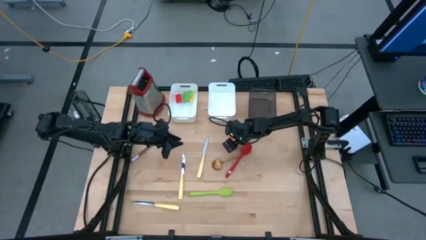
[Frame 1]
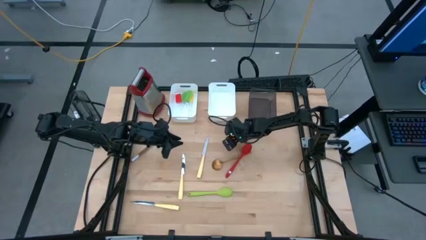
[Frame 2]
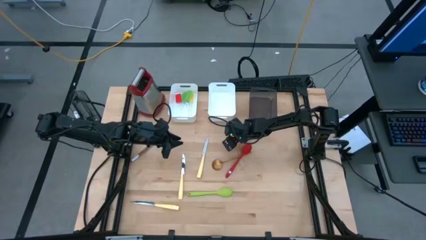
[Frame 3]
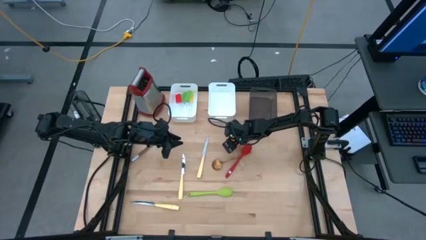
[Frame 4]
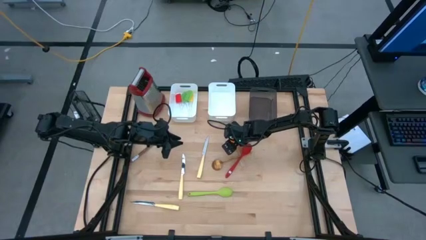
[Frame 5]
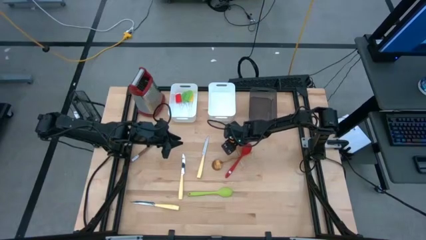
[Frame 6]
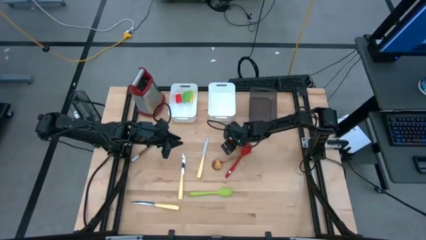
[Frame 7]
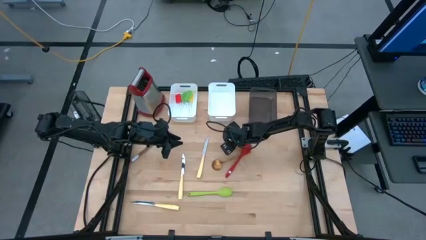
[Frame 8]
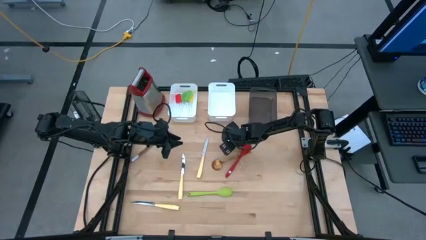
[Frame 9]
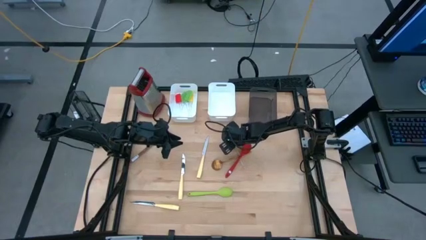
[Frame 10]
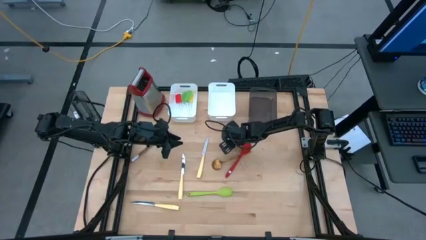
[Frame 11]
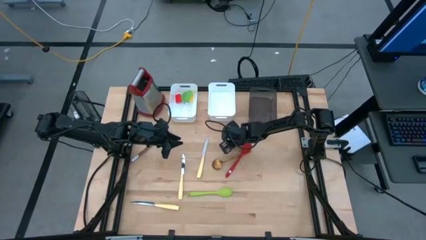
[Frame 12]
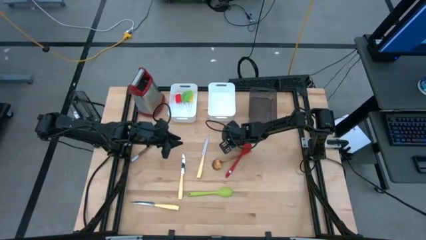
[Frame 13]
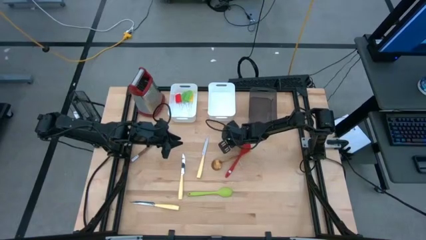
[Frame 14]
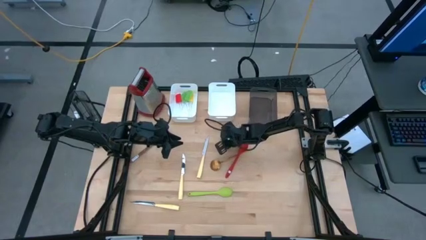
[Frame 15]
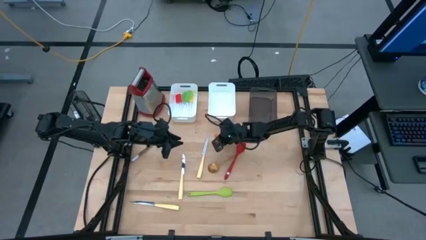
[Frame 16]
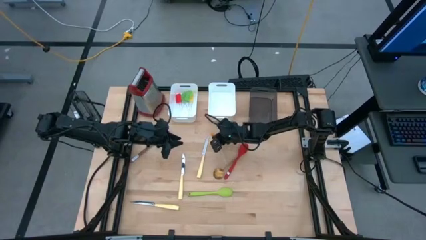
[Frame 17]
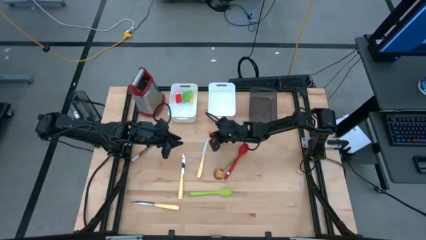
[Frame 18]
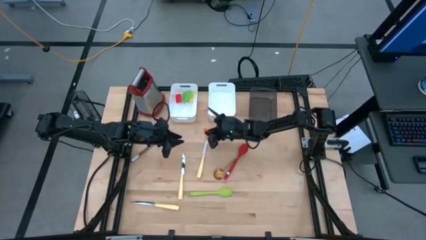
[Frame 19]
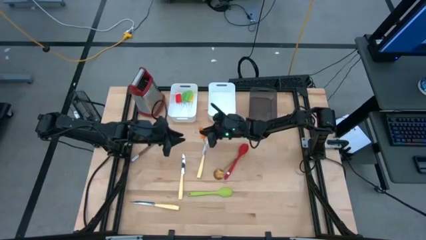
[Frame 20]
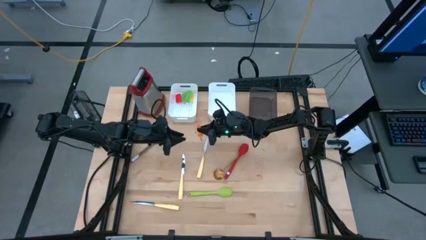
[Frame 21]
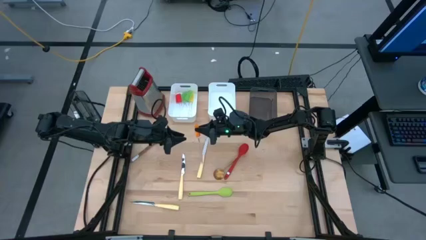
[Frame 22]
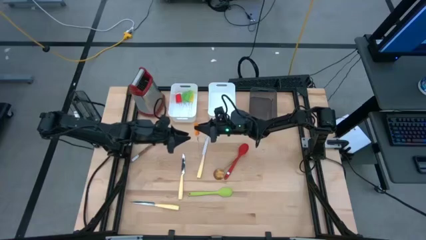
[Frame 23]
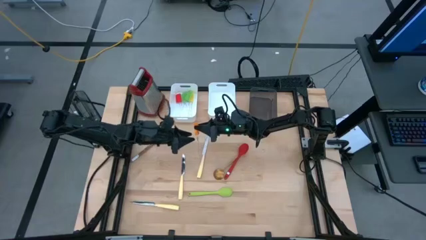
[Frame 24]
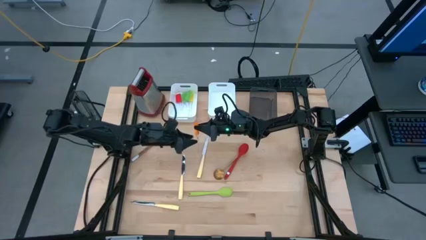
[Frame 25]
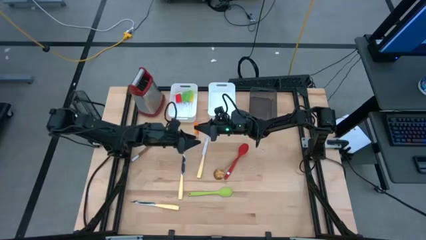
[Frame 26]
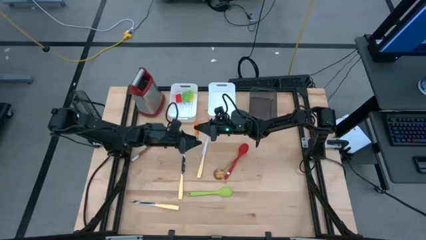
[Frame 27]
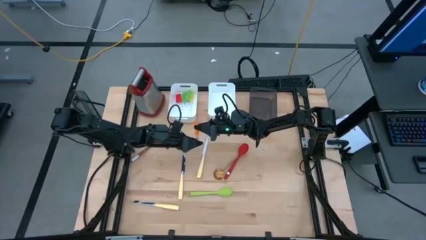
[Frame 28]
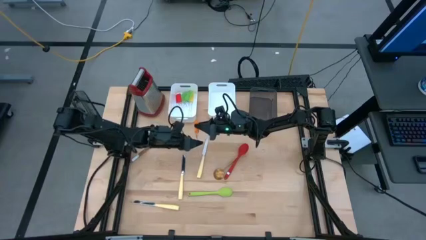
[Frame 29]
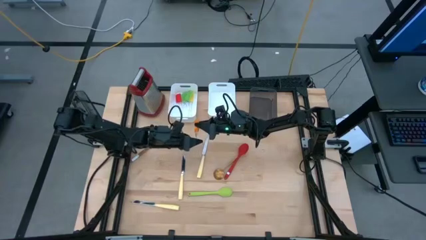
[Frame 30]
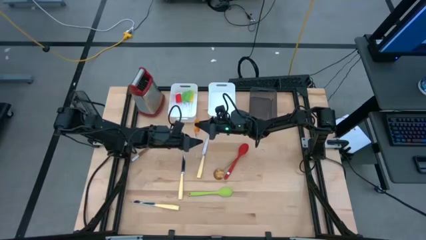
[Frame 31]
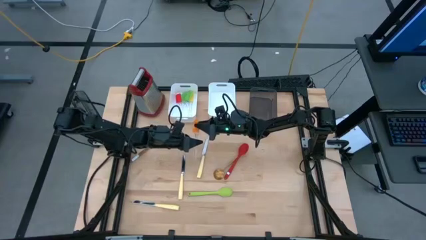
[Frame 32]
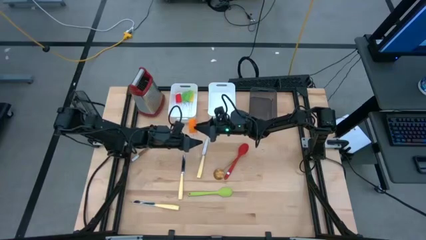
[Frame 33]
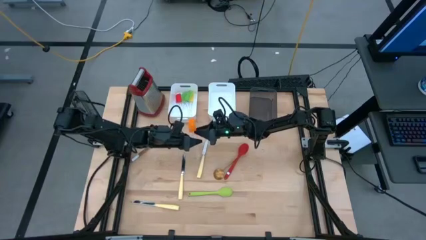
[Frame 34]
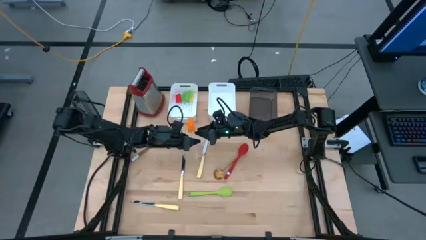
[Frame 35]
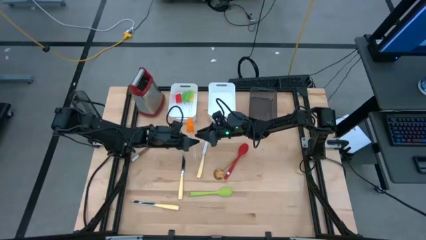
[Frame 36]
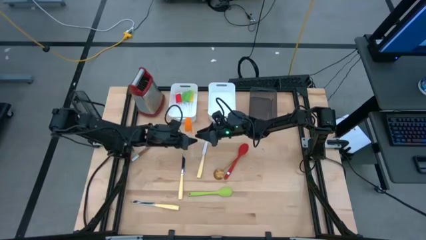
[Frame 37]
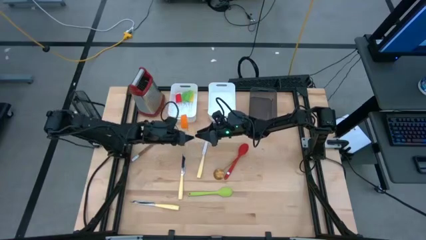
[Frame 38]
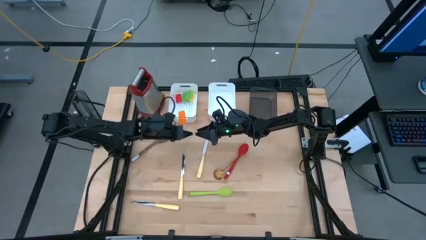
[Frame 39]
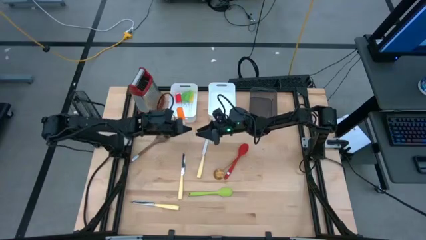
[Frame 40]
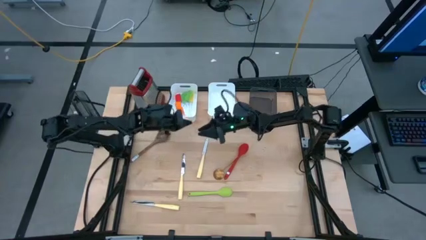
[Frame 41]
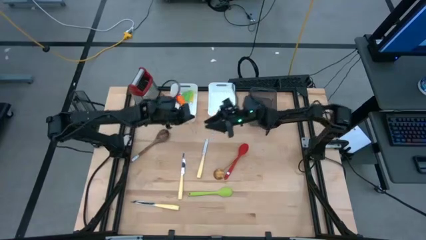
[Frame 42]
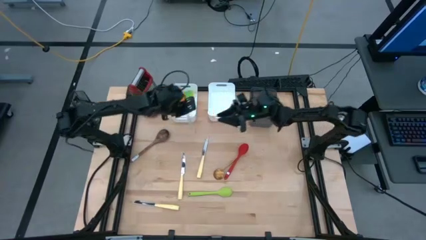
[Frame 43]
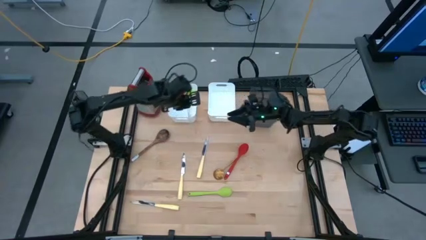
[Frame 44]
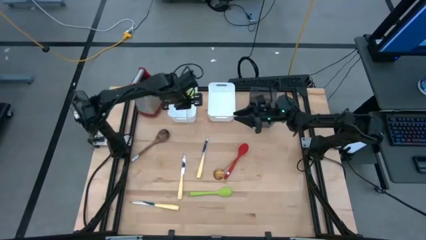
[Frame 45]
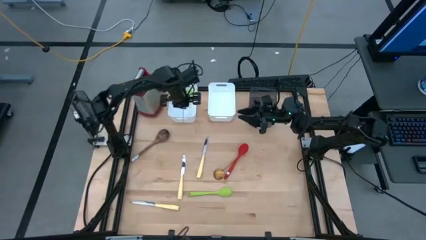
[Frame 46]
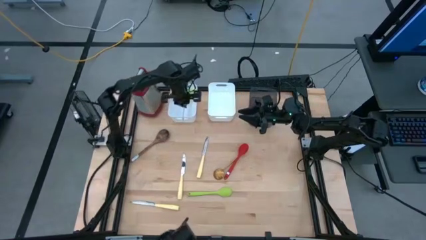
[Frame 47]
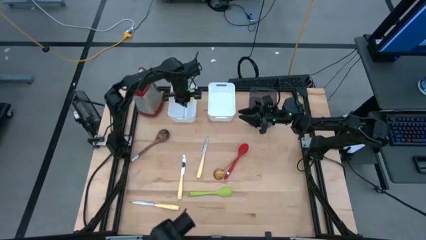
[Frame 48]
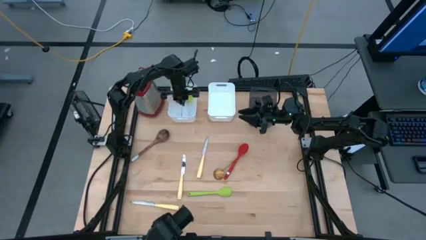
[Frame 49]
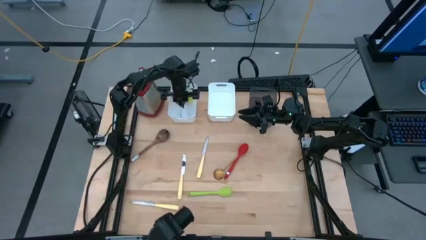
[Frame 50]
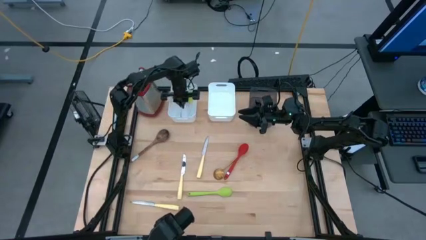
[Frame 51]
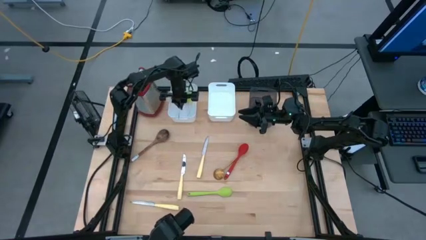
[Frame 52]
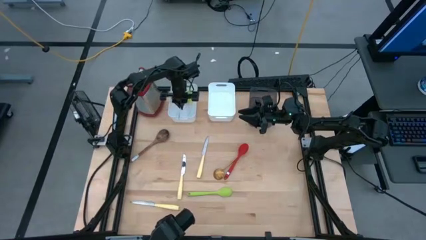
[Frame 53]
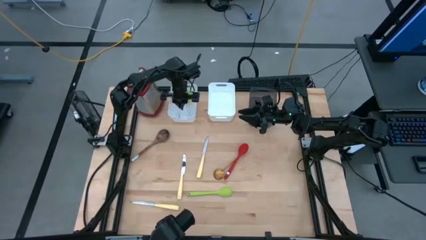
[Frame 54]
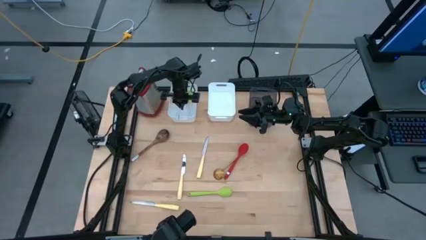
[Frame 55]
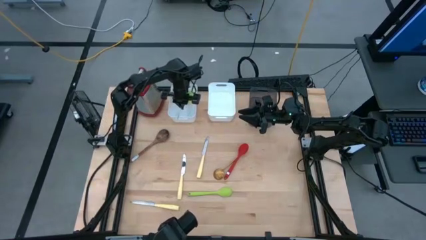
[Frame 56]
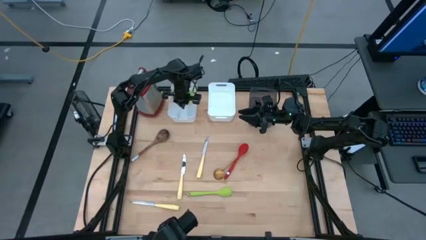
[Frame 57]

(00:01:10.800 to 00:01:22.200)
Task: Pick & Place Kitchen Items
Put the orange spatula into the left white bin
